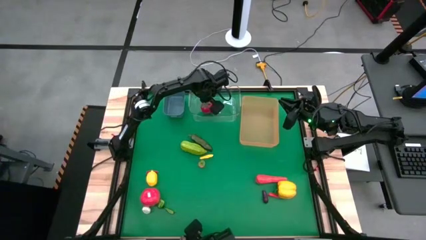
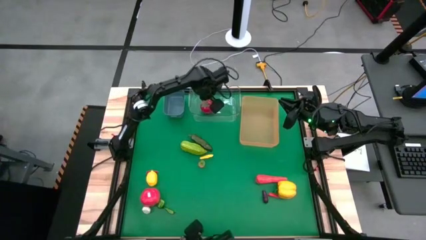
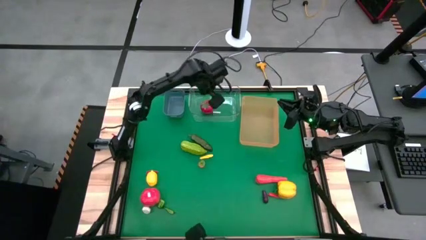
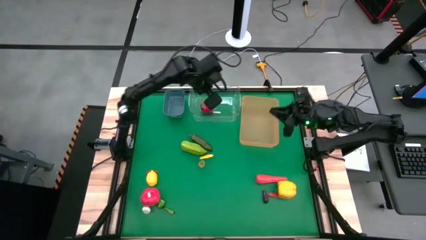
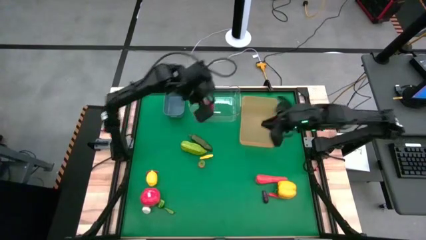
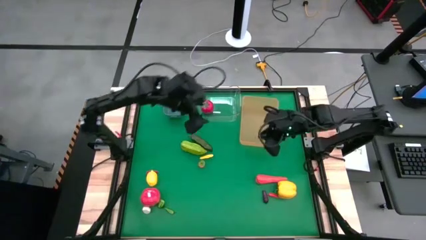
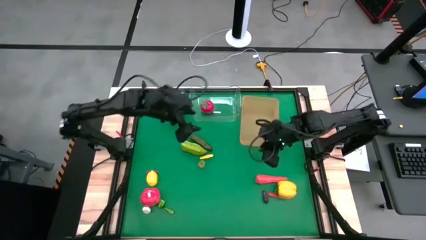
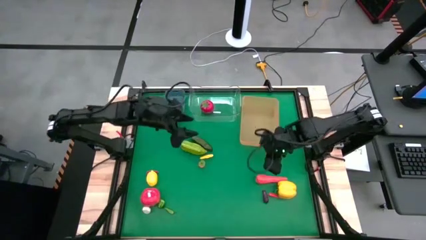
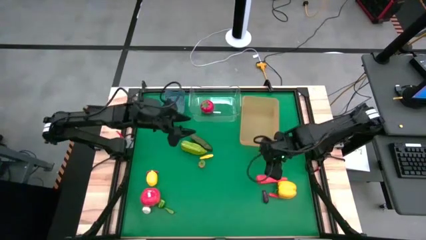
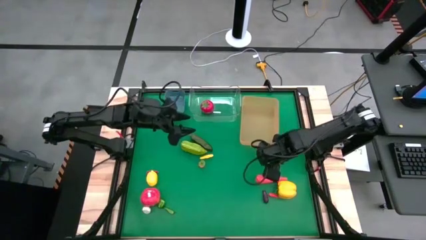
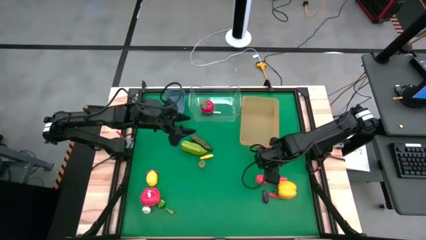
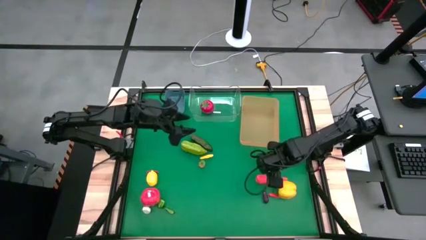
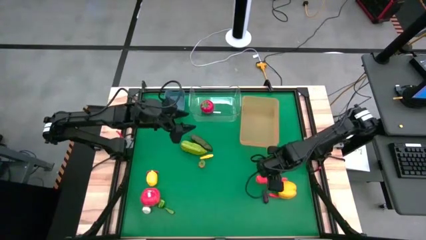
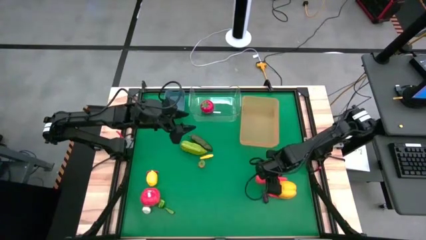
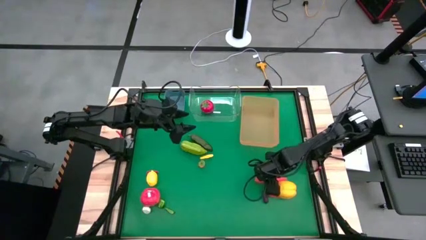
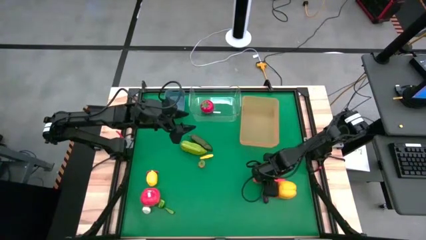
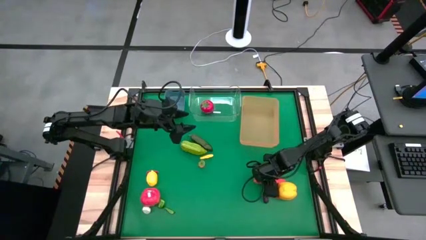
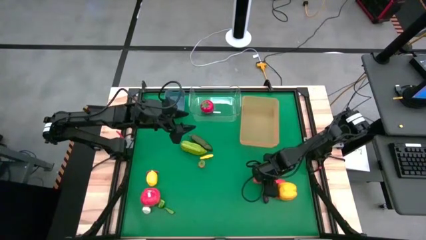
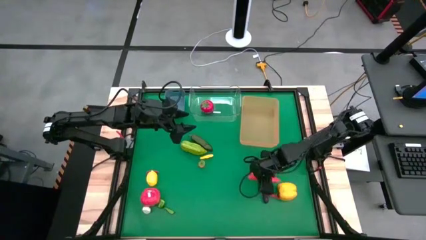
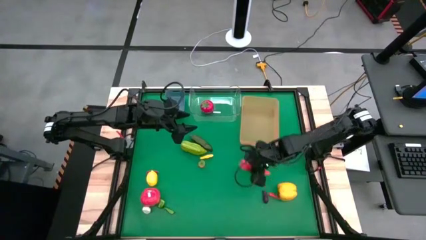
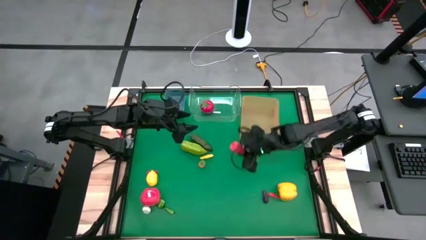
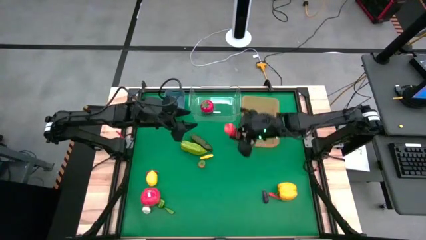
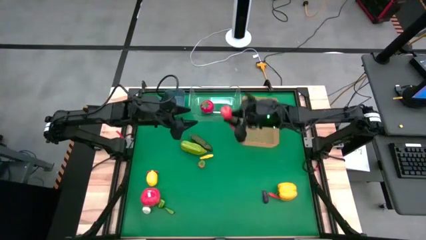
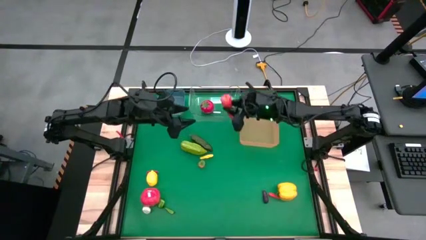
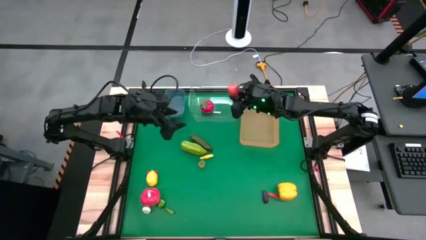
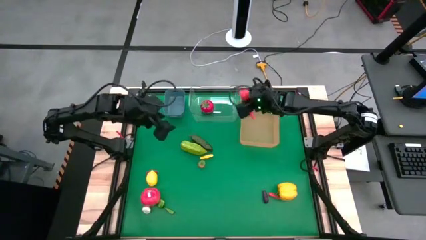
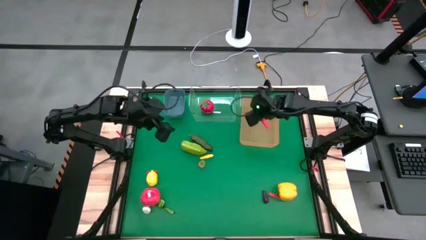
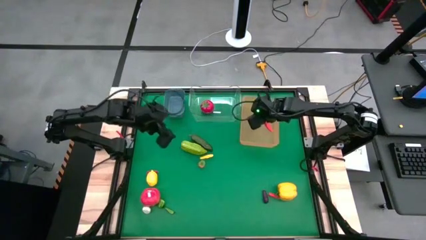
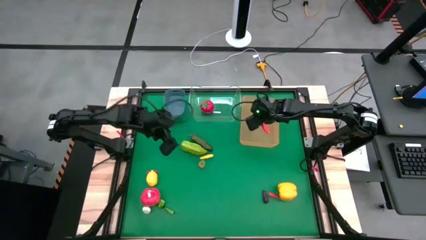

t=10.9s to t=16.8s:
Task: Sort produce into baskets
Put the carrot into the orange bin

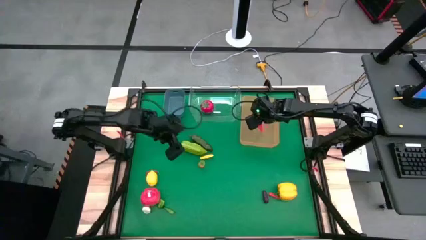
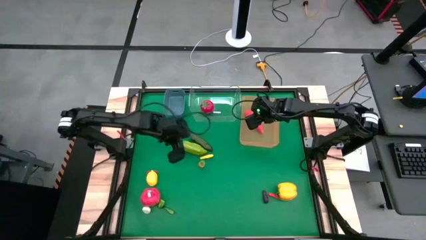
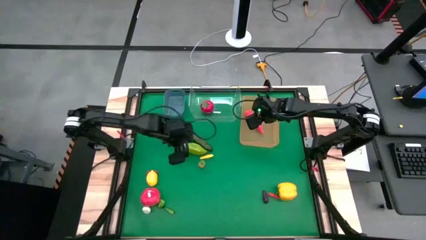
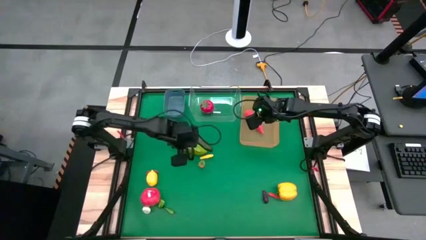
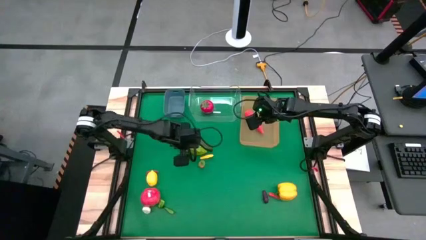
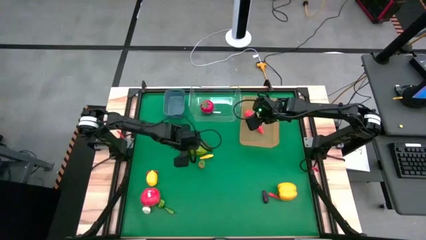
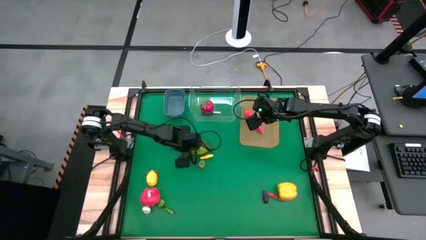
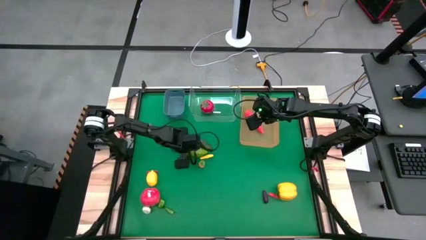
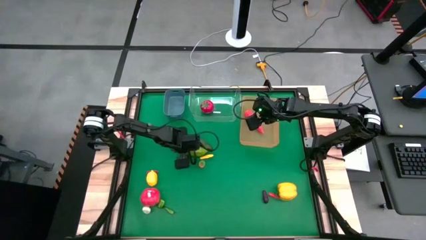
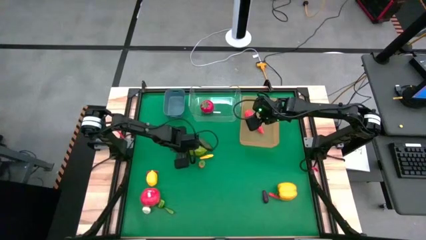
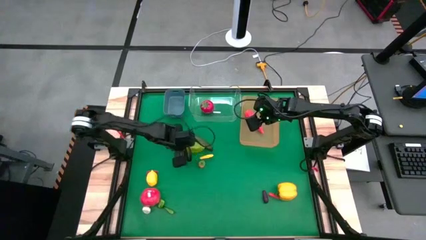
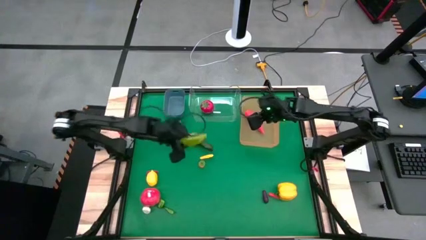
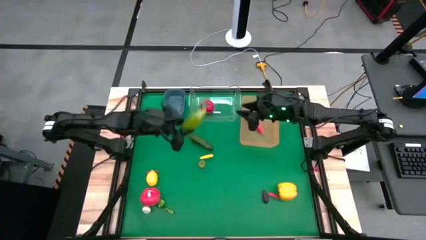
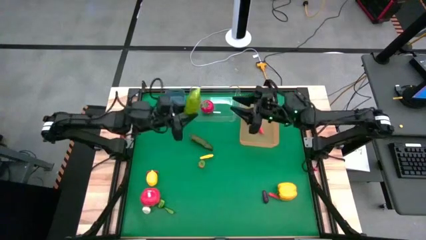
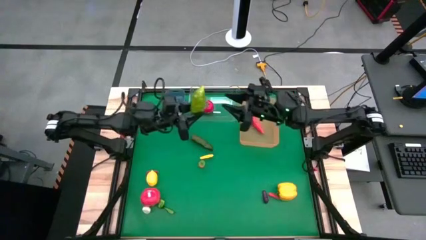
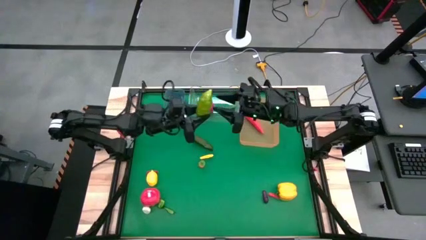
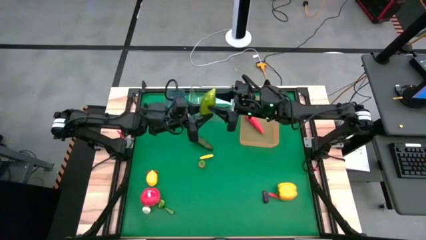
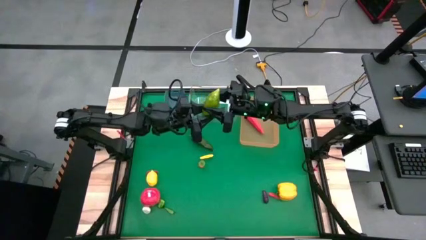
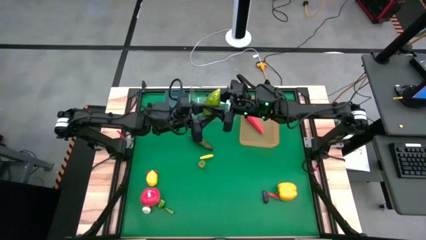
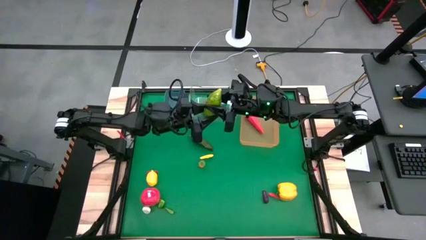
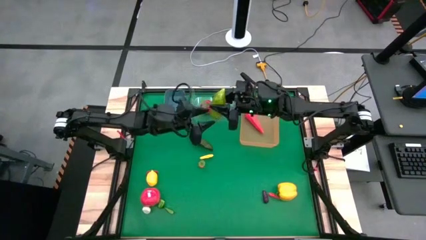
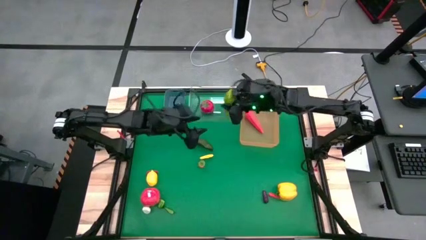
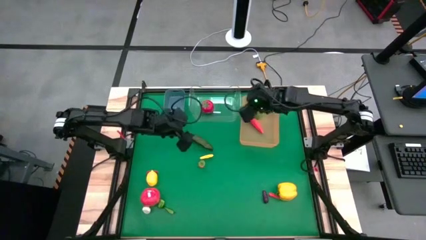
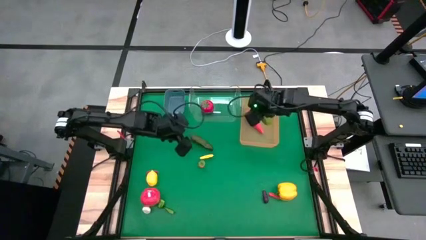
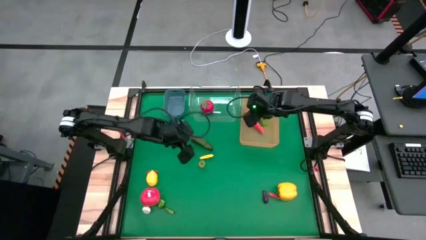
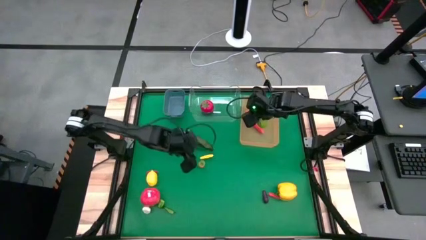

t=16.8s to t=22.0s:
Put the cucumber into the orange bin

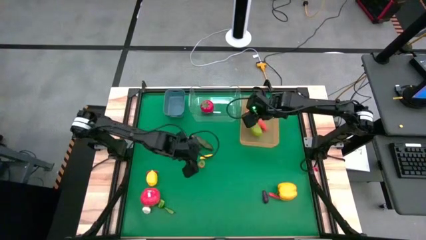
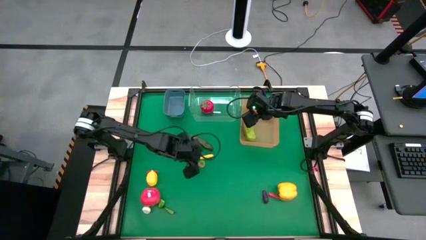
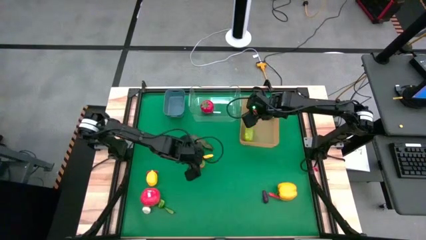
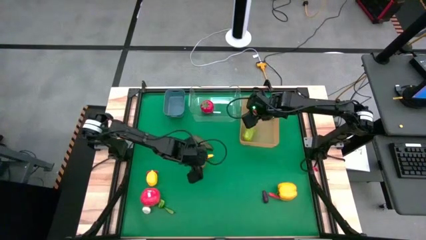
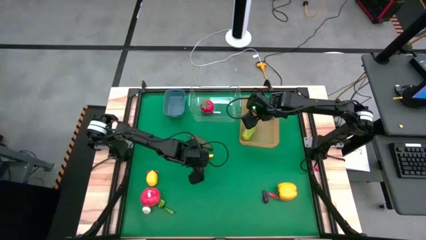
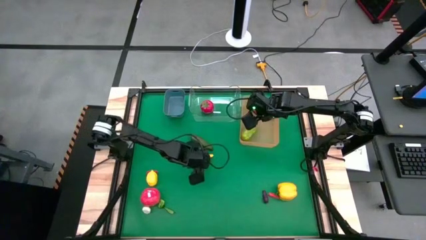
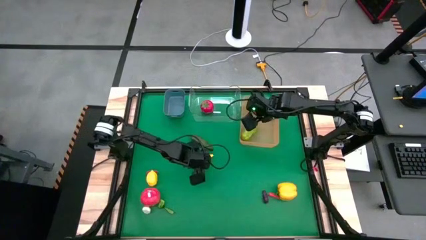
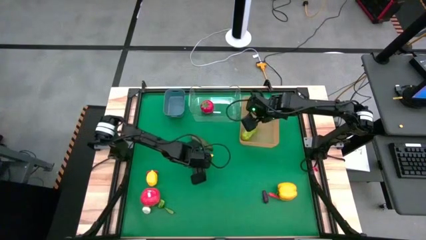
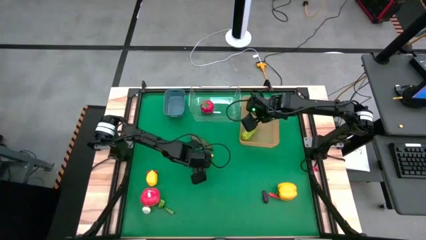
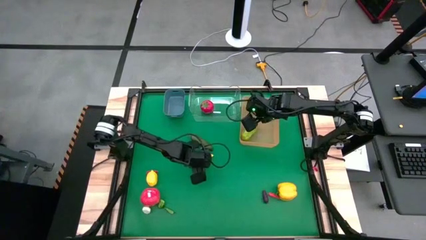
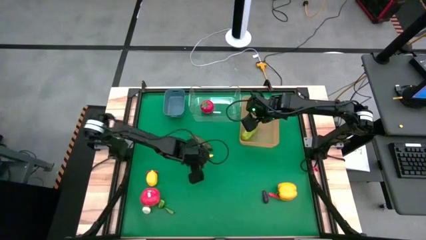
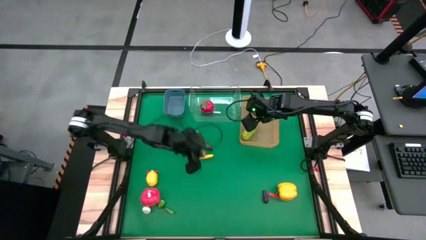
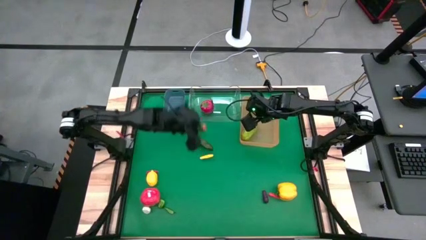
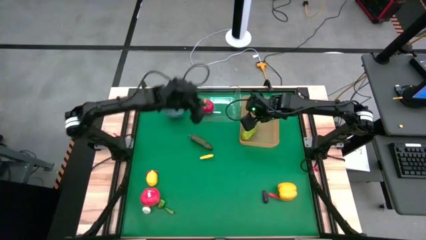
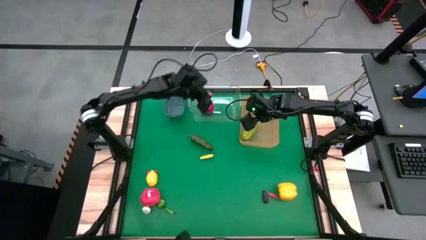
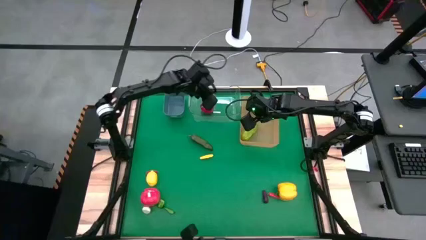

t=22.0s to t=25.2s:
Put the small tomato into the transparent bin

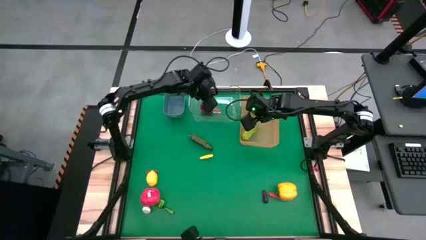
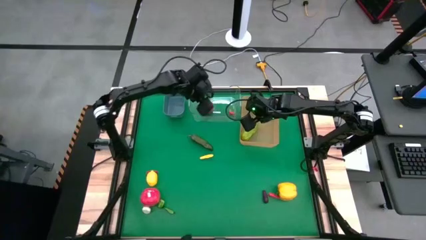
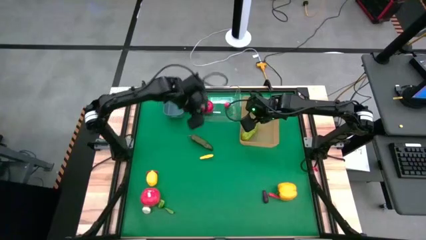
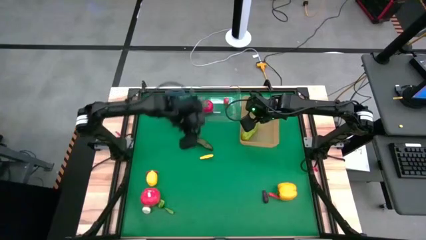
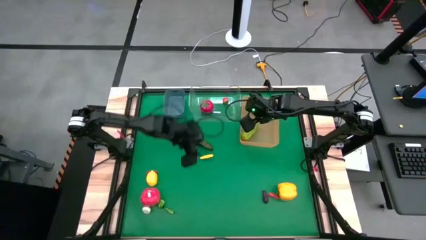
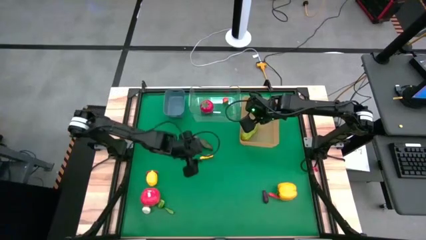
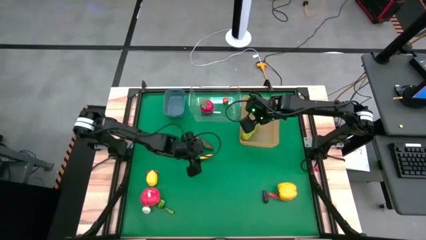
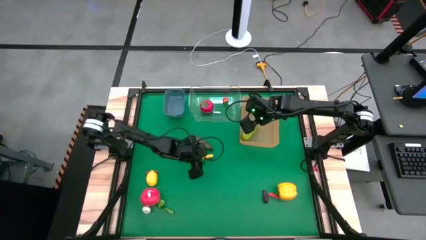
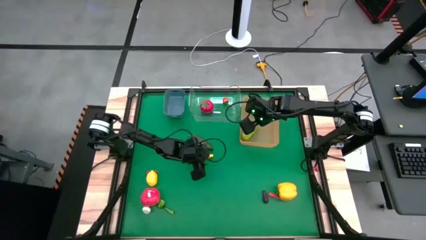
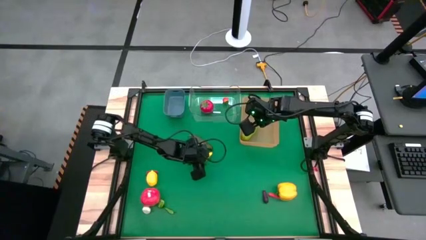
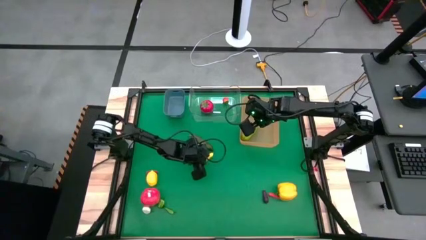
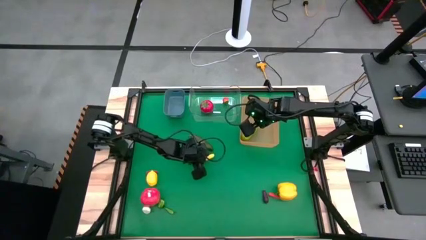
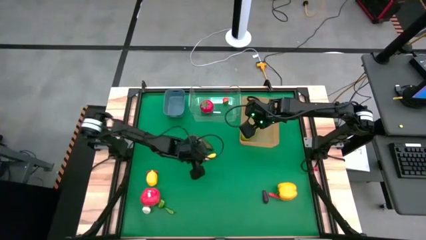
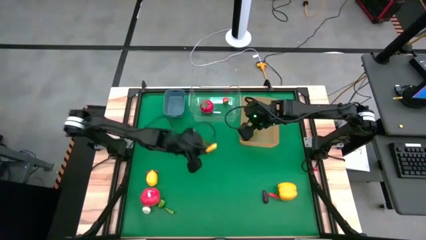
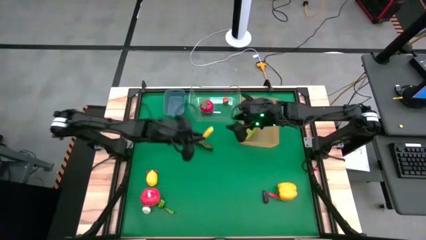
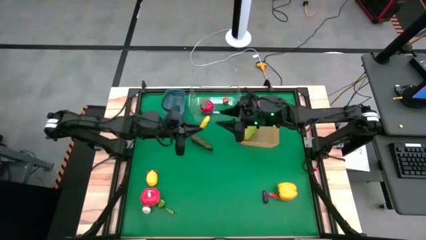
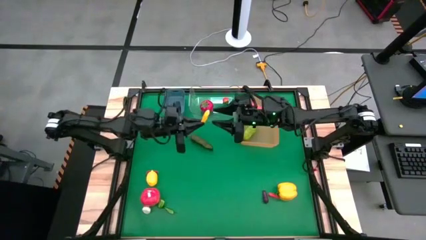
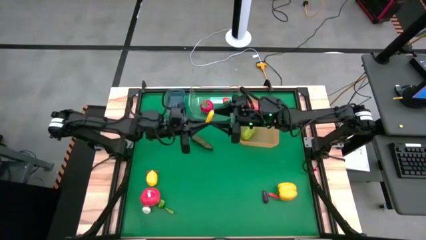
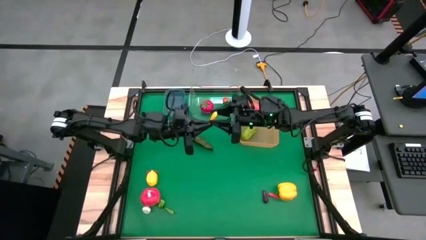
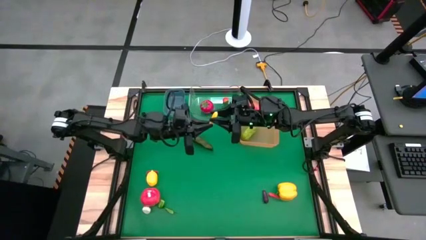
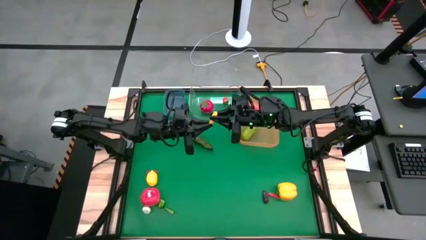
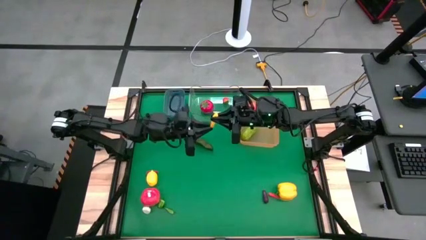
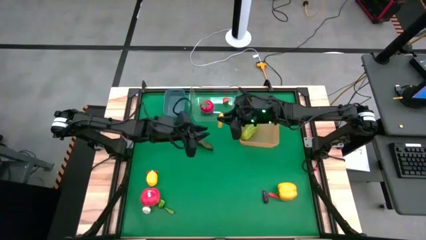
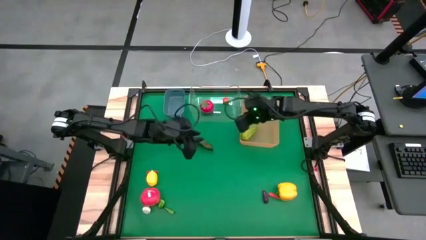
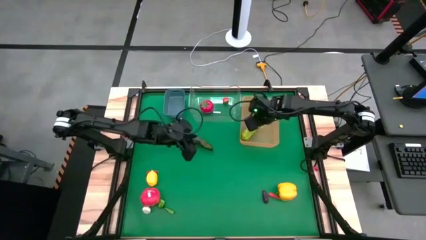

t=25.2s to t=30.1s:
Put the corn into the orange bin
